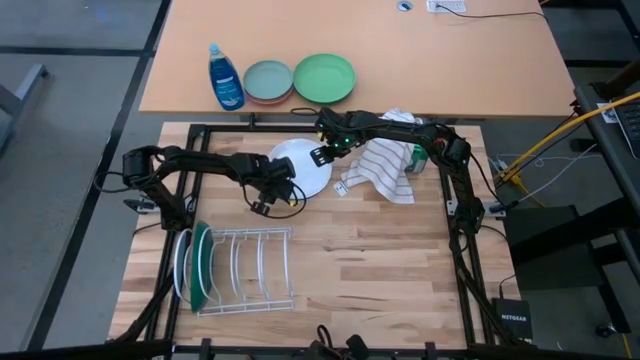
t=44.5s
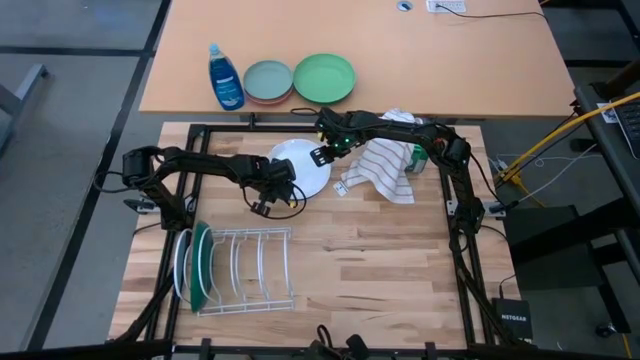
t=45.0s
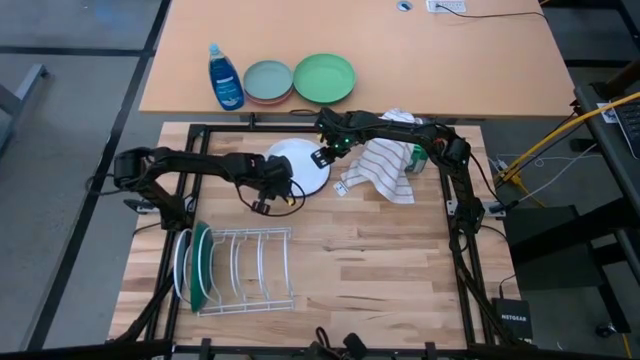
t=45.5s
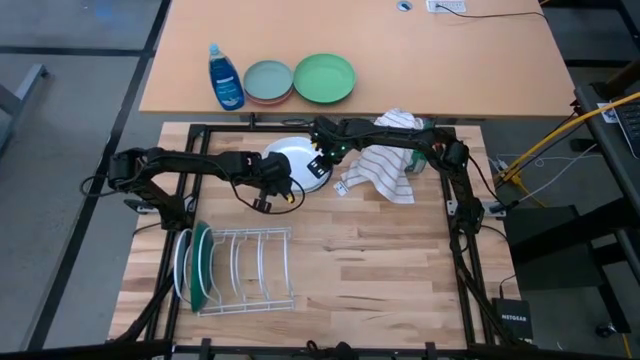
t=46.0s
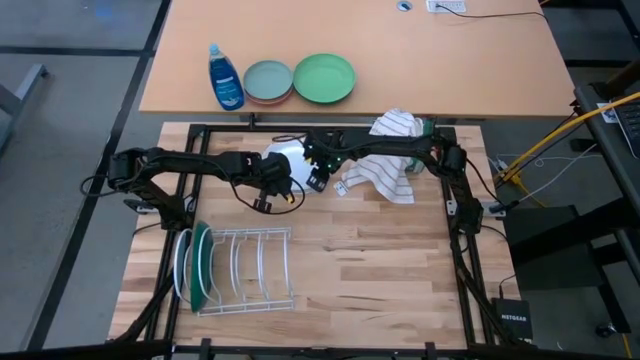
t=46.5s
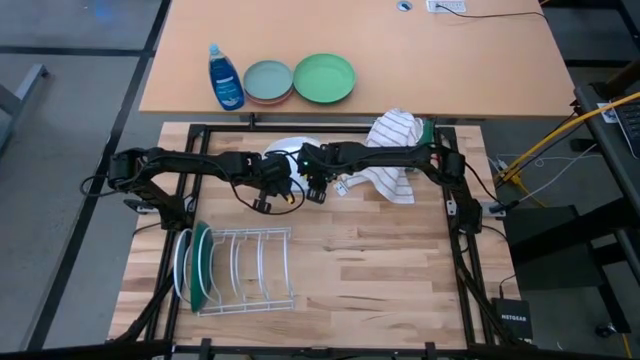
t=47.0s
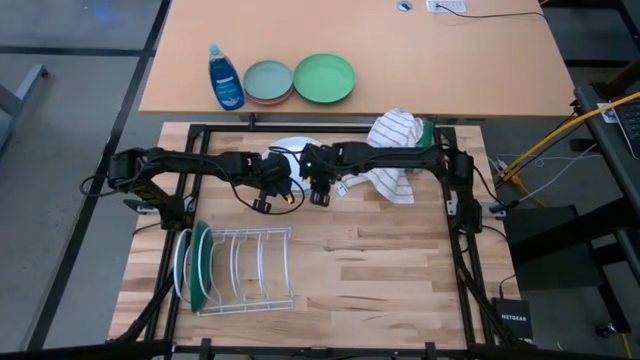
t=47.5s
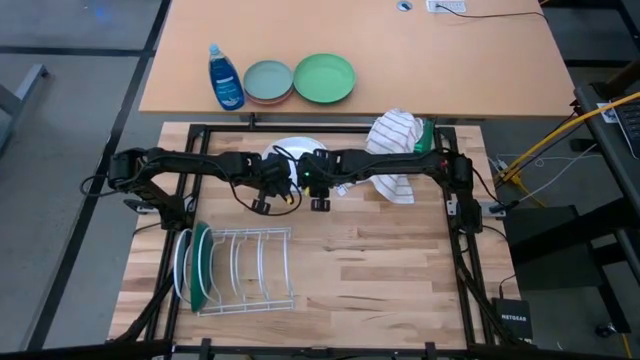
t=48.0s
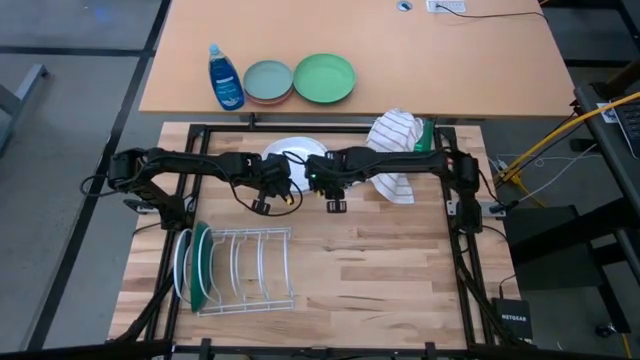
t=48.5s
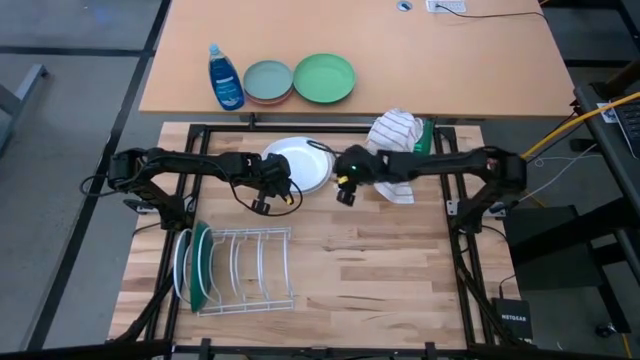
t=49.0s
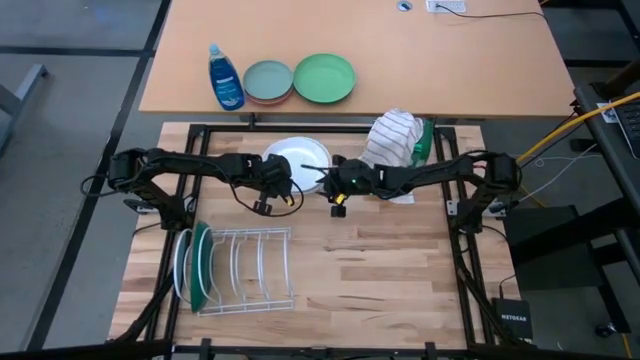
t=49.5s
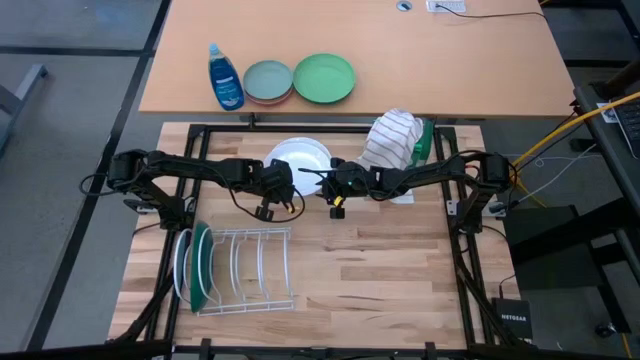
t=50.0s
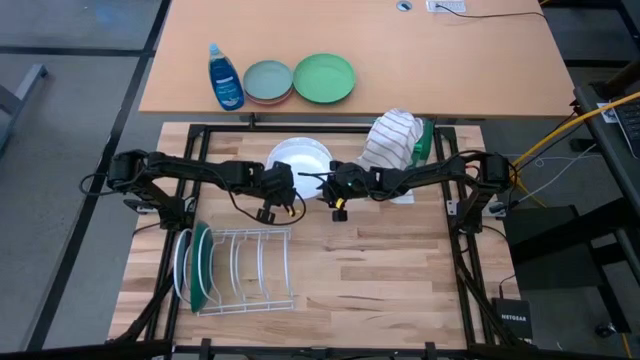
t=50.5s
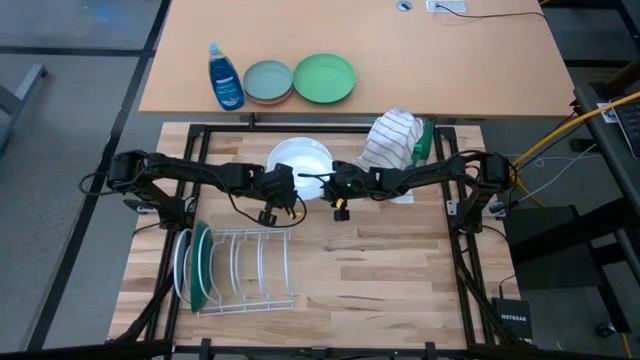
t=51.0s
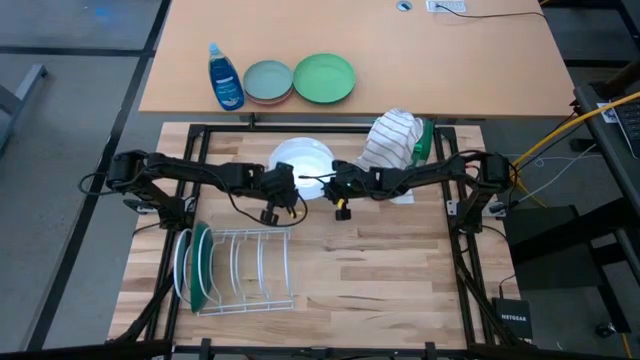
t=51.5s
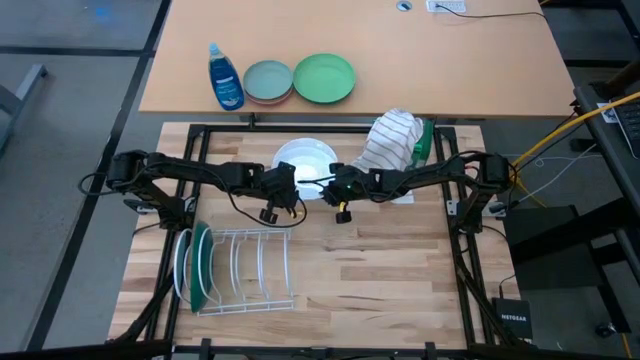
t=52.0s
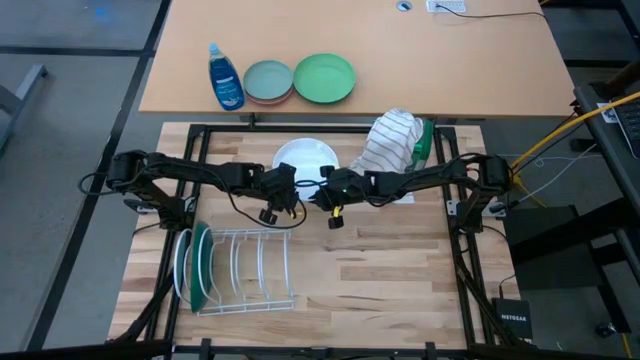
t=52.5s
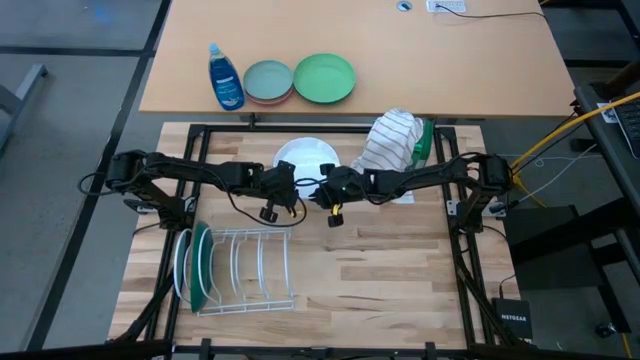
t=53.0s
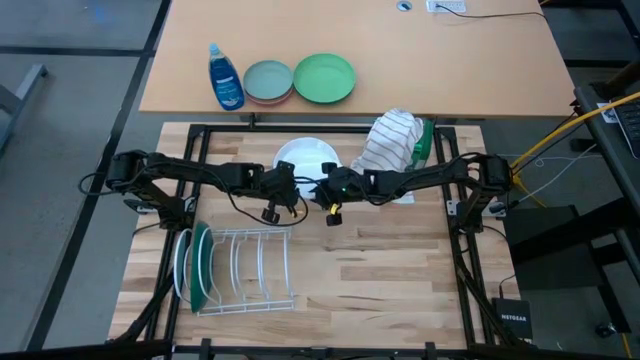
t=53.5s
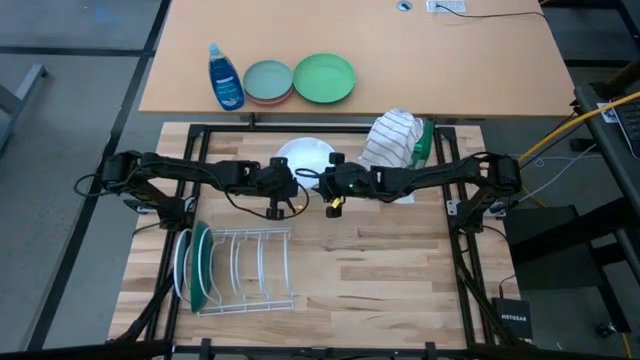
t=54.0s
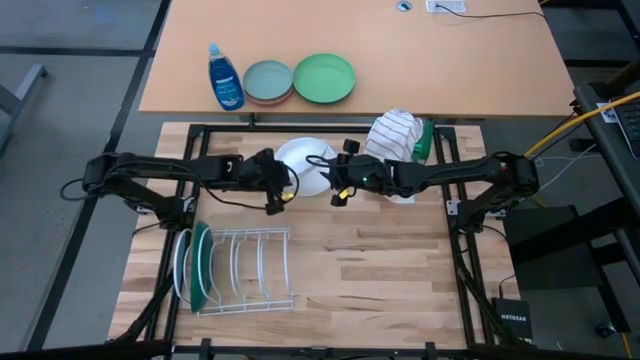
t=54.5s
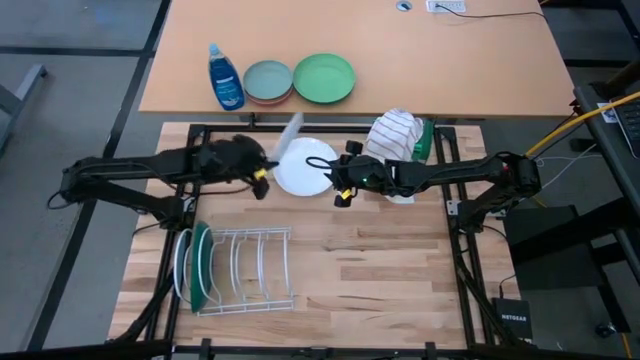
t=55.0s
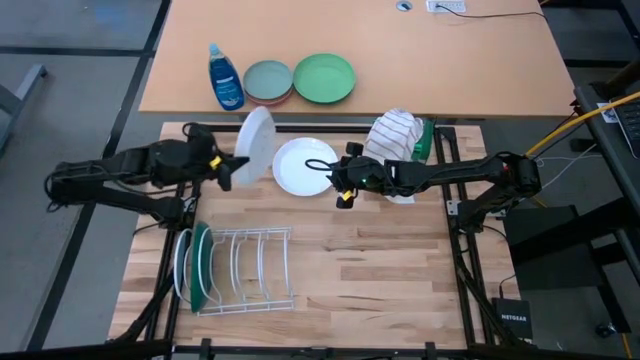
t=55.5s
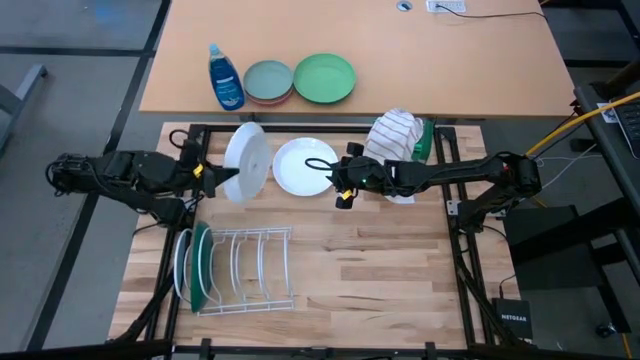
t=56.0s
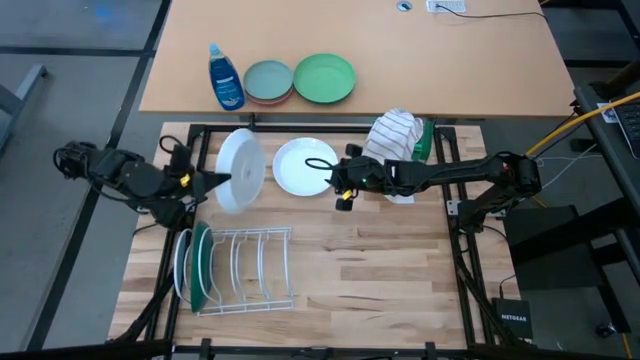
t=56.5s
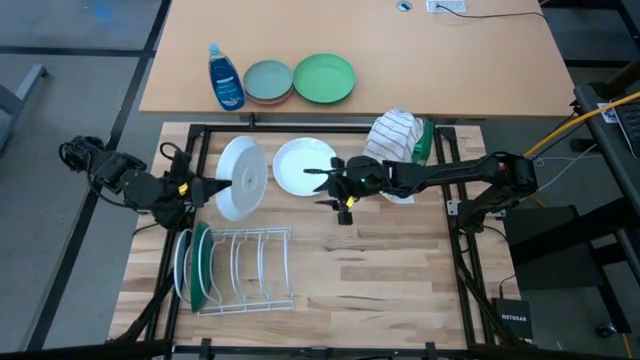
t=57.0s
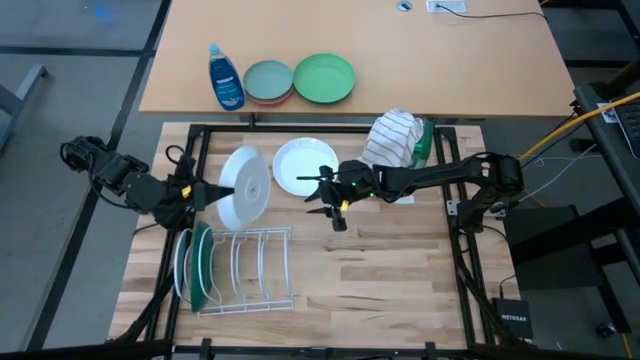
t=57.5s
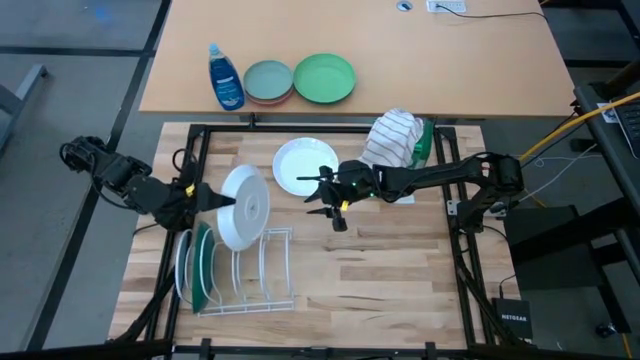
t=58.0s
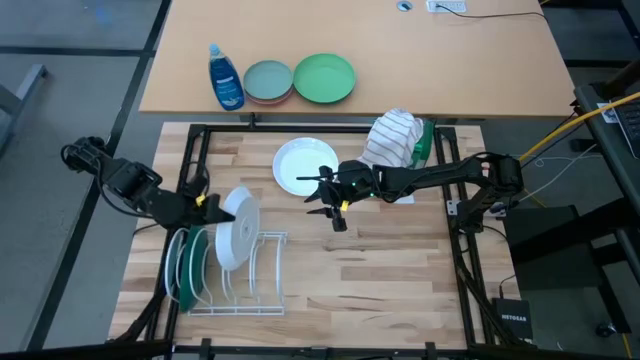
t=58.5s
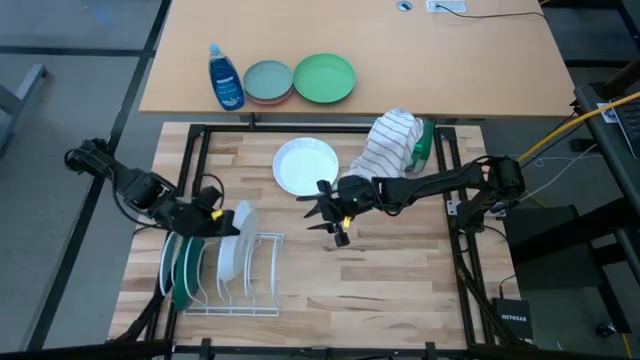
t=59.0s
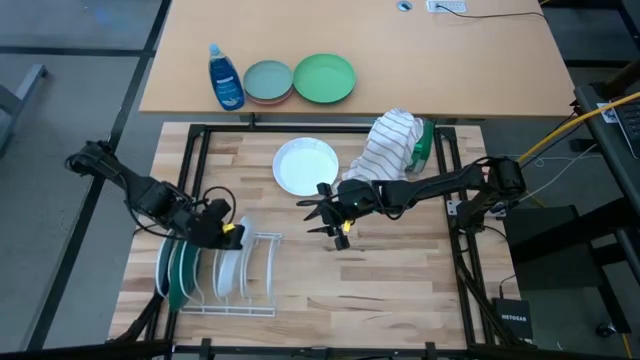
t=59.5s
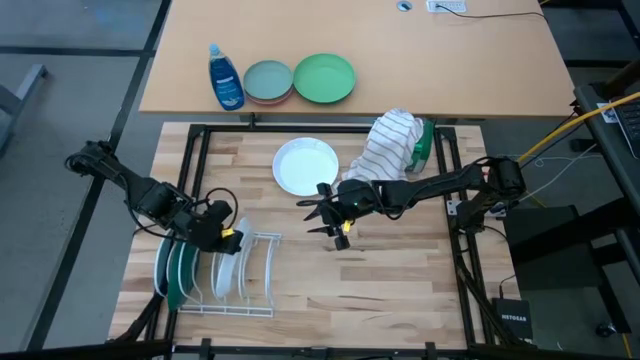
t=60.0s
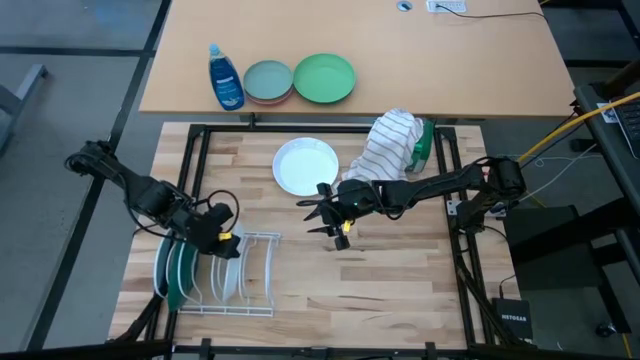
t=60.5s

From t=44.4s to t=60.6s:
Task: Sort dishes
Put the white plate in the white dish rack

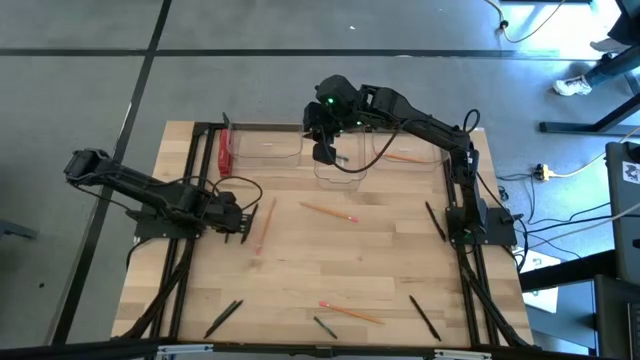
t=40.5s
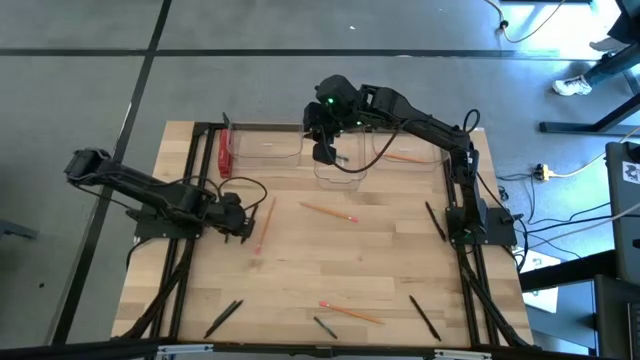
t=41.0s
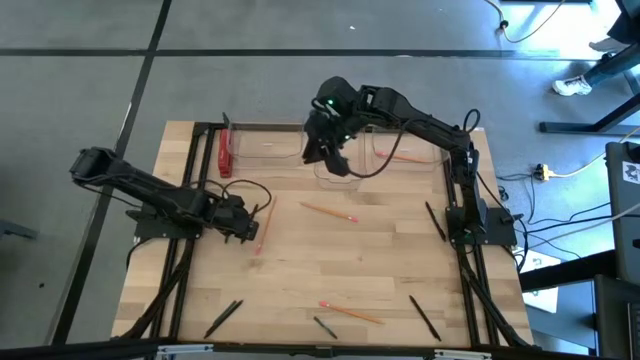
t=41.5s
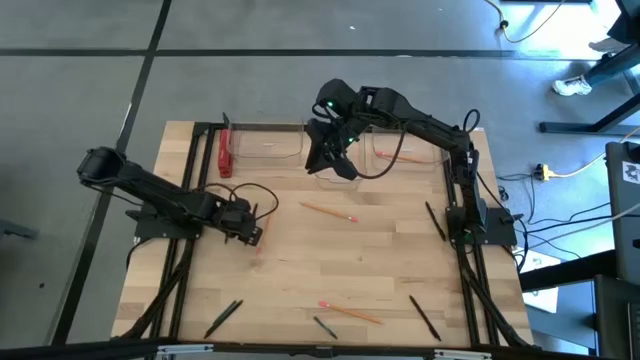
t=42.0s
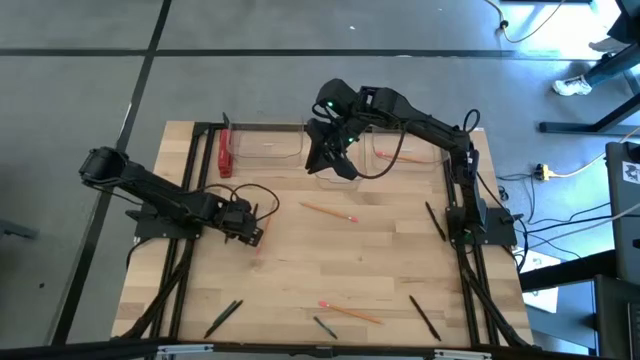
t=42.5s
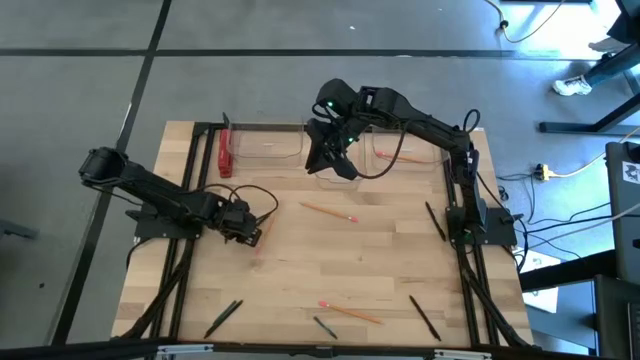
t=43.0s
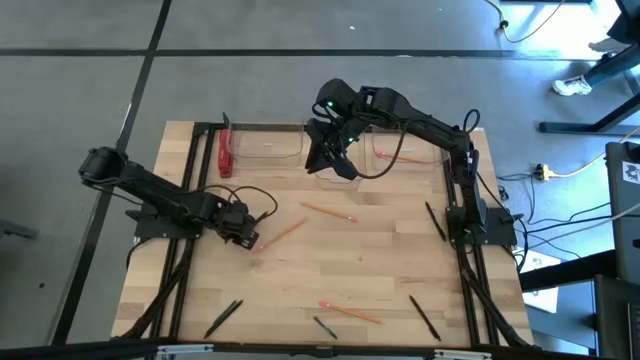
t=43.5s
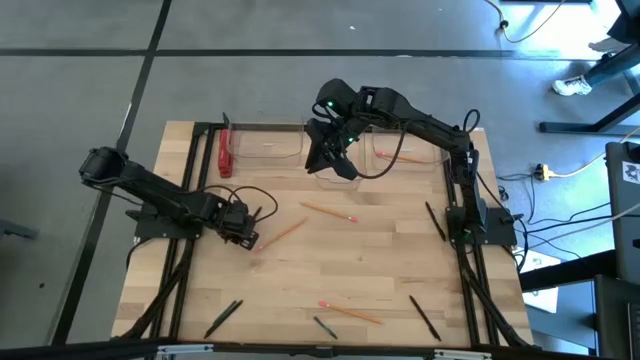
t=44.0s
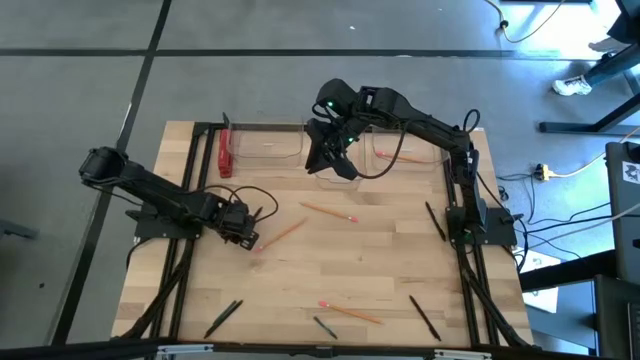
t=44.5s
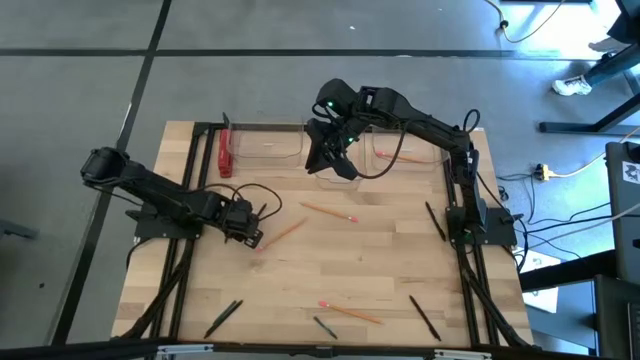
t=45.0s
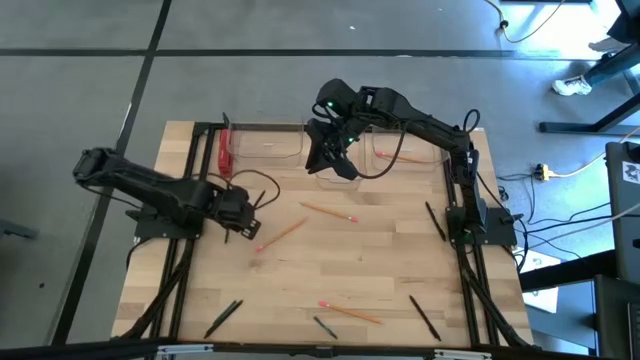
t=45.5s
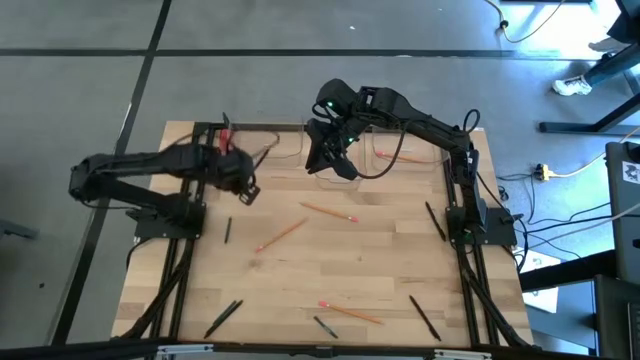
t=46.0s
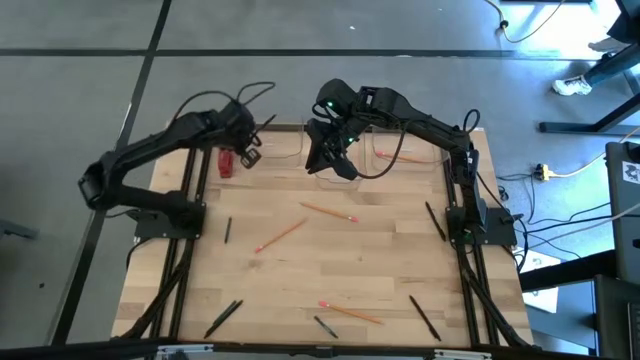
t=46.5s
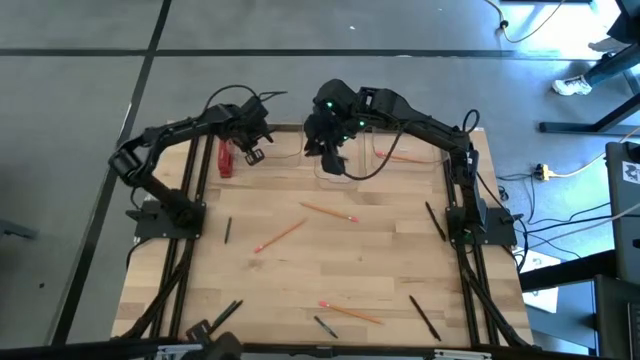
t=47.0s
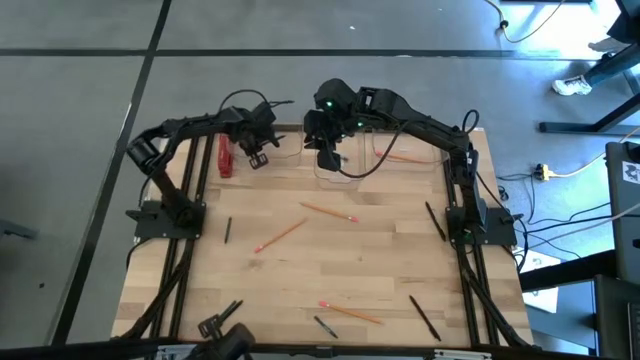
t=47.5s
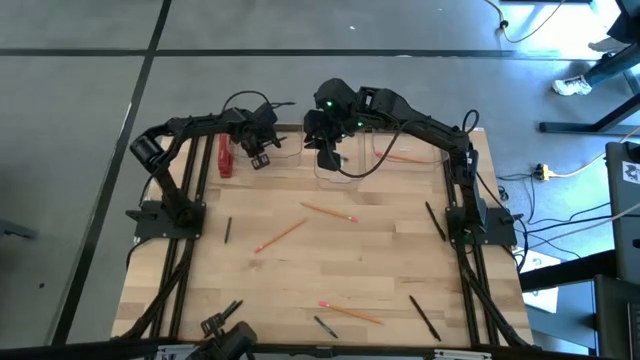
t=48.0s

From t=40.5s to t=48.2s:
Task: Sort crayons/erasers/pens/pencils in bins
Put the black pen into the left transparent bin
